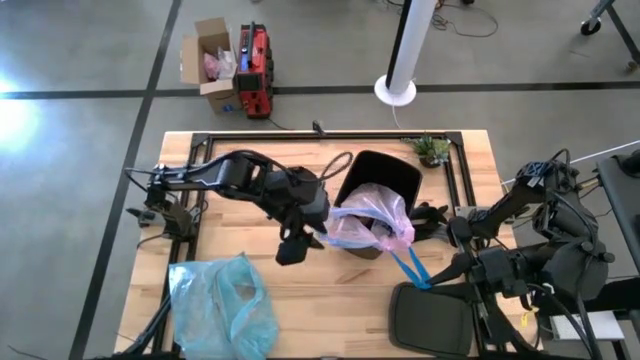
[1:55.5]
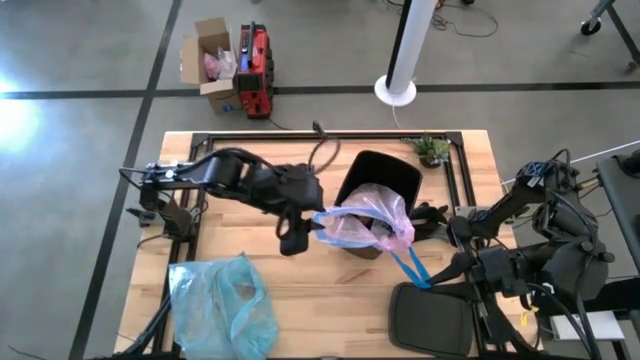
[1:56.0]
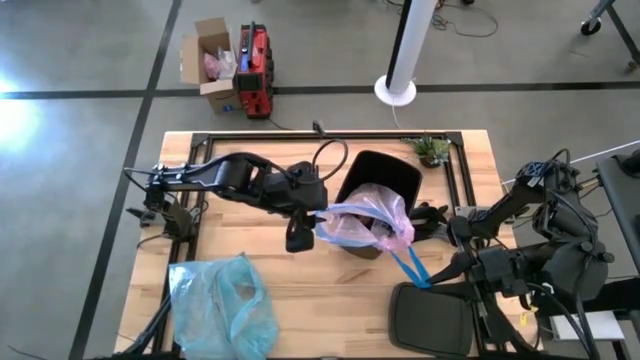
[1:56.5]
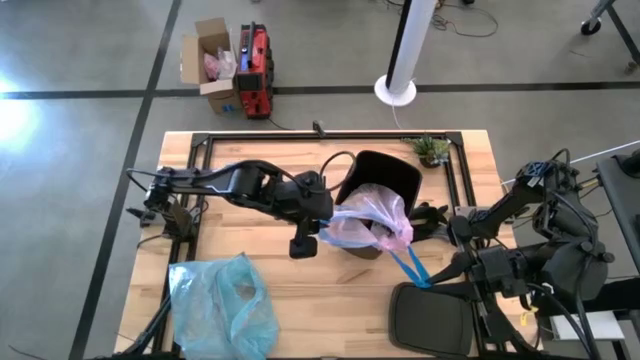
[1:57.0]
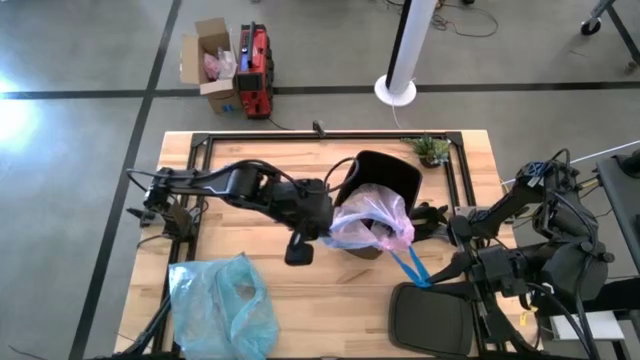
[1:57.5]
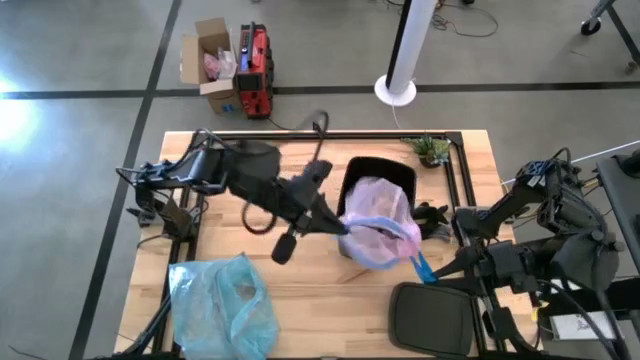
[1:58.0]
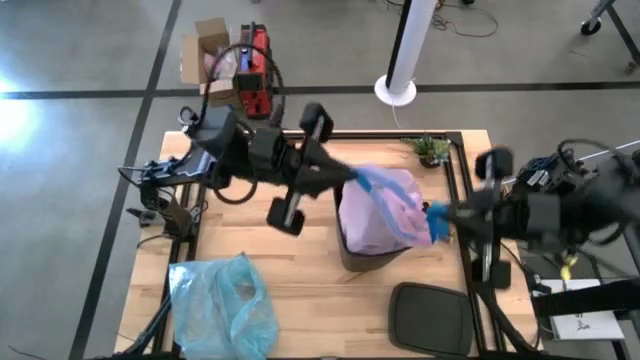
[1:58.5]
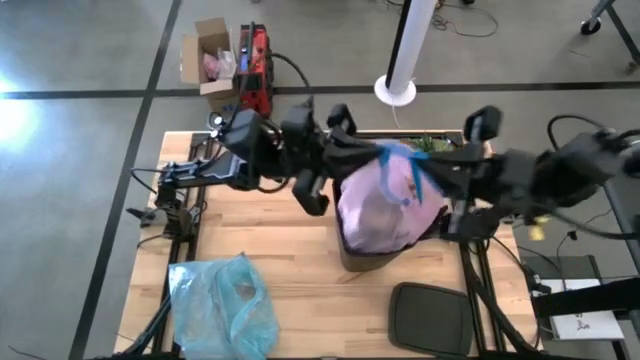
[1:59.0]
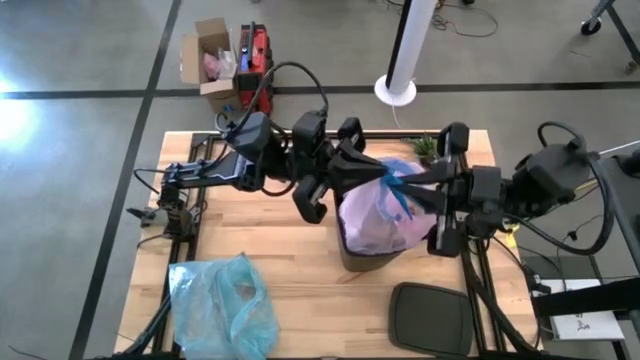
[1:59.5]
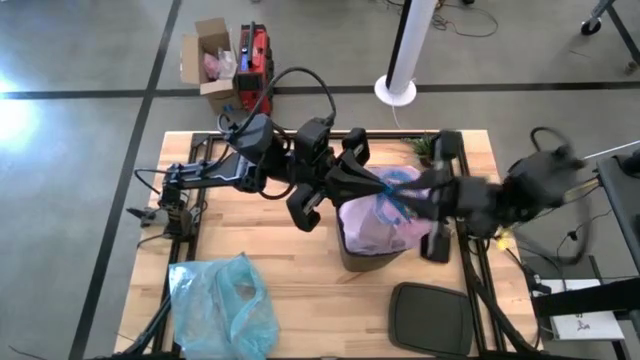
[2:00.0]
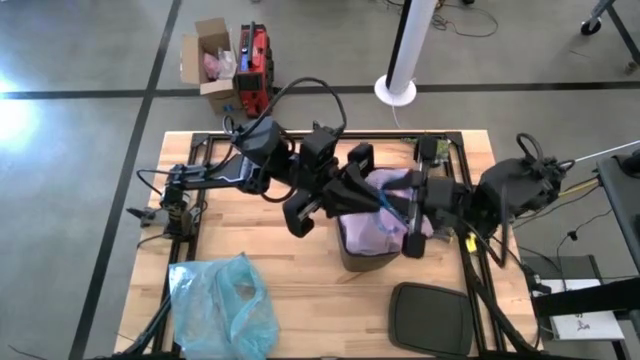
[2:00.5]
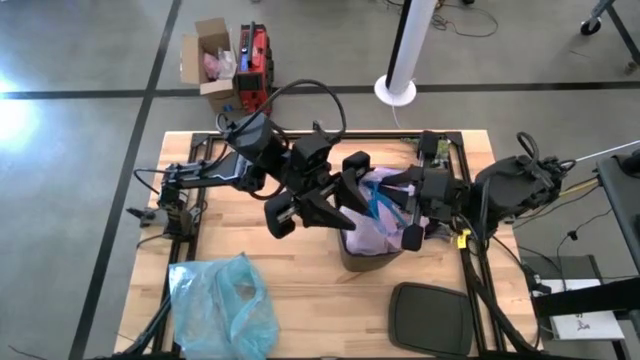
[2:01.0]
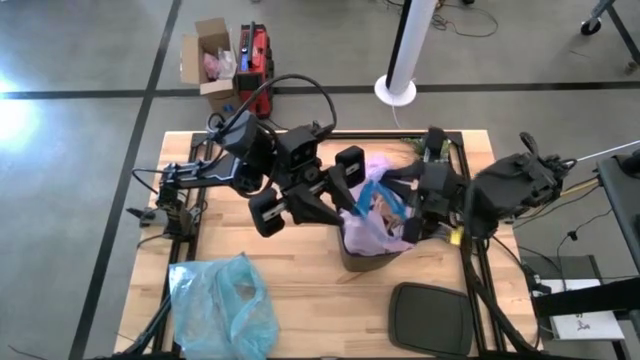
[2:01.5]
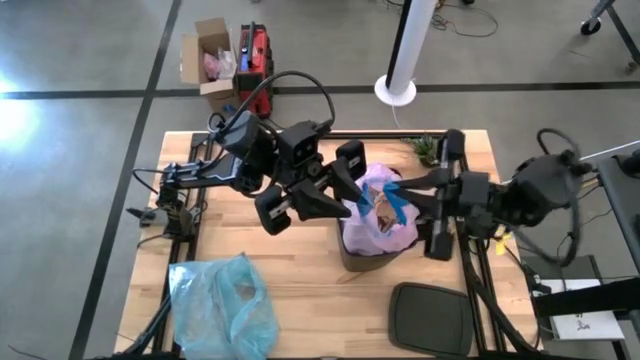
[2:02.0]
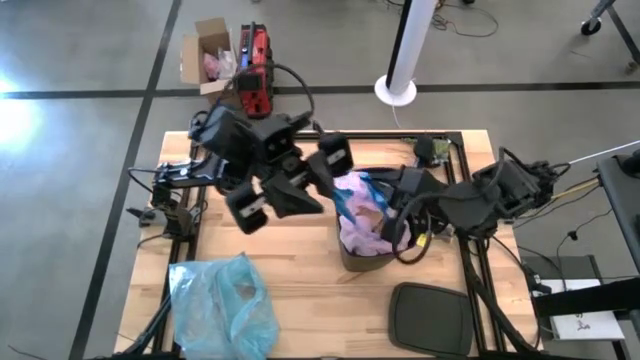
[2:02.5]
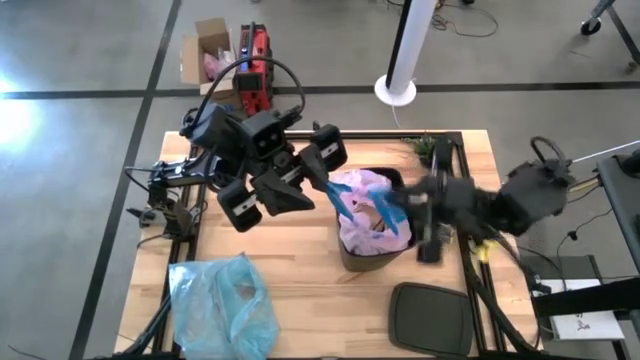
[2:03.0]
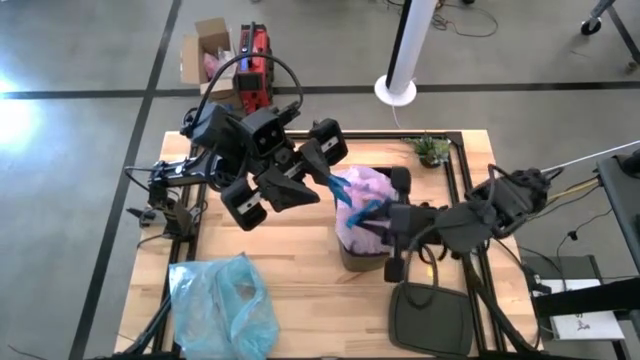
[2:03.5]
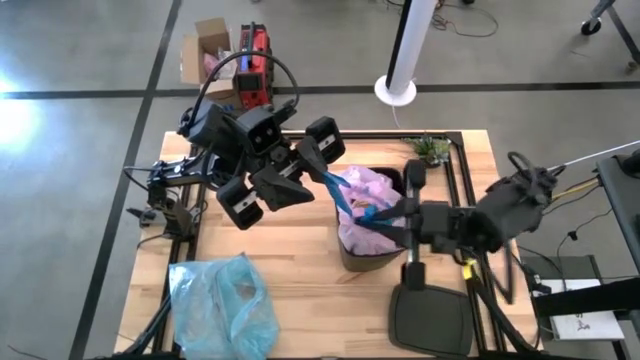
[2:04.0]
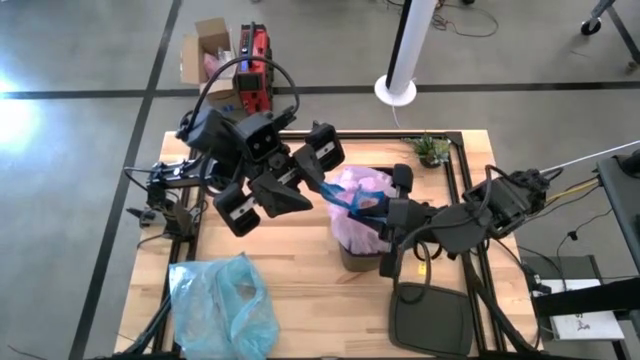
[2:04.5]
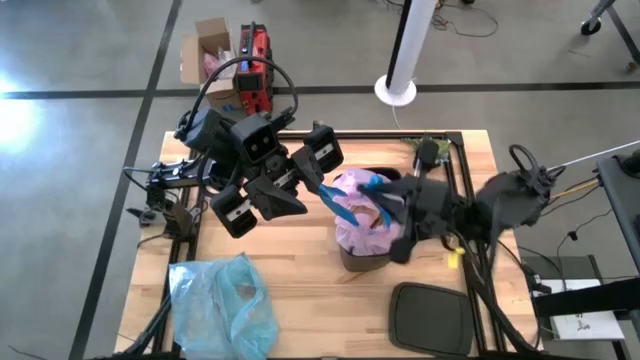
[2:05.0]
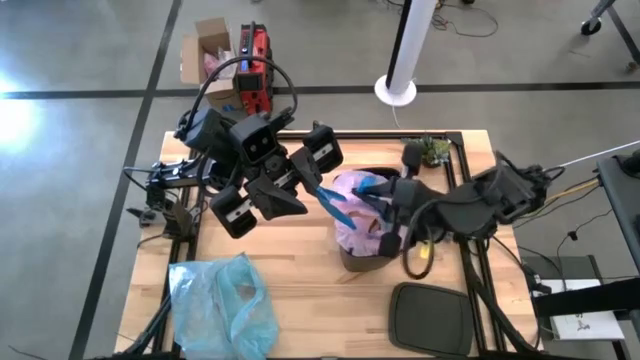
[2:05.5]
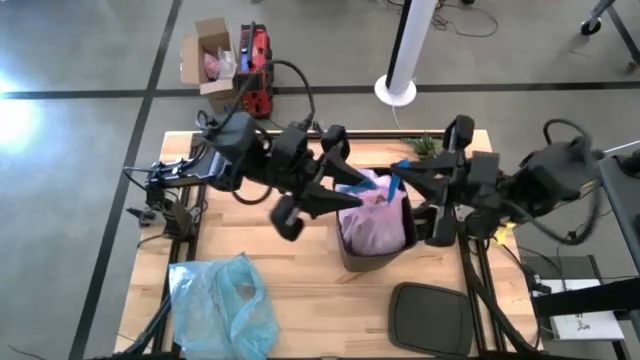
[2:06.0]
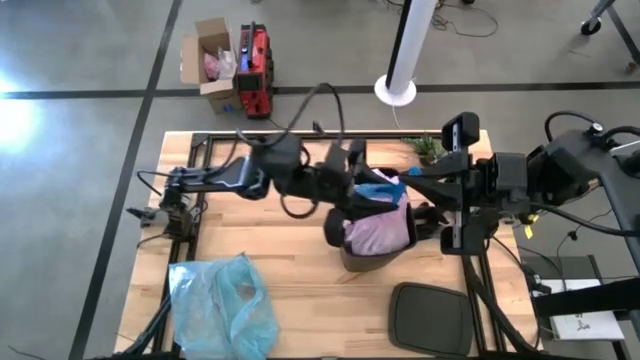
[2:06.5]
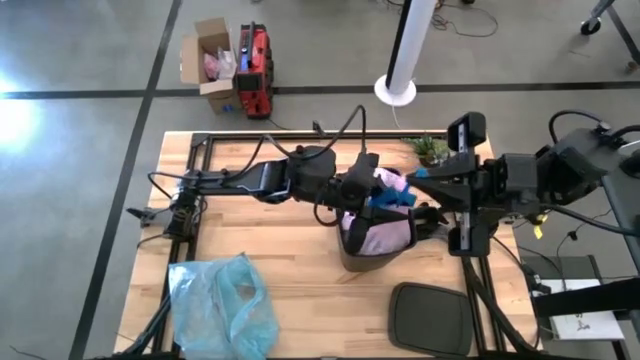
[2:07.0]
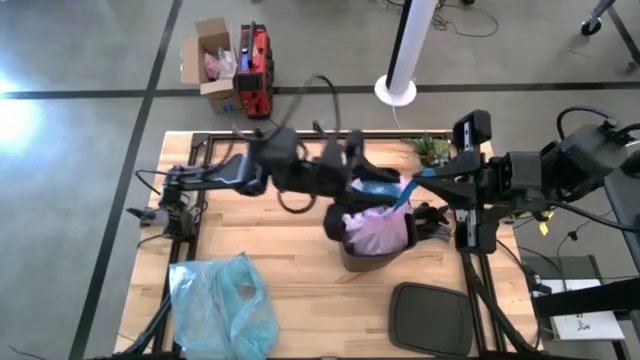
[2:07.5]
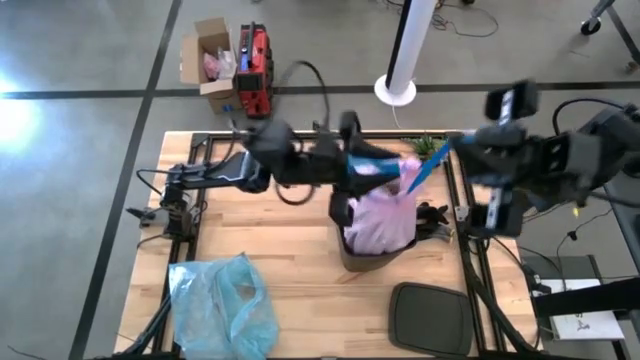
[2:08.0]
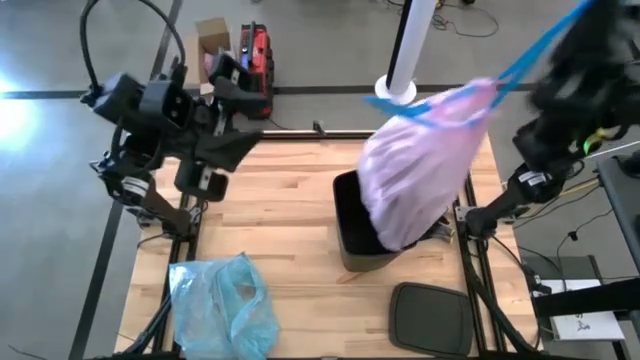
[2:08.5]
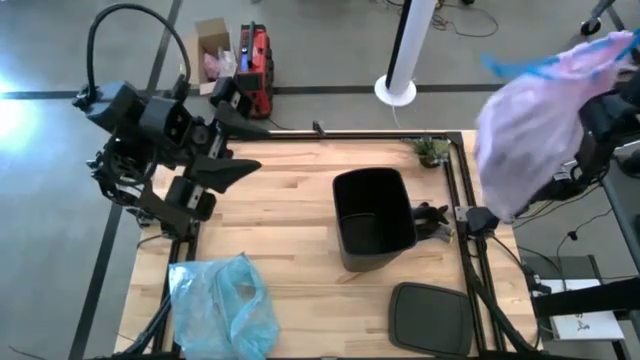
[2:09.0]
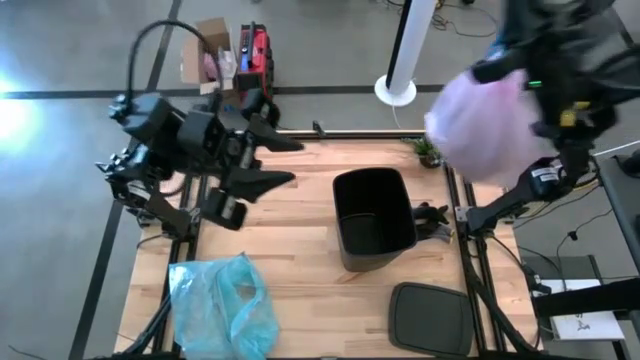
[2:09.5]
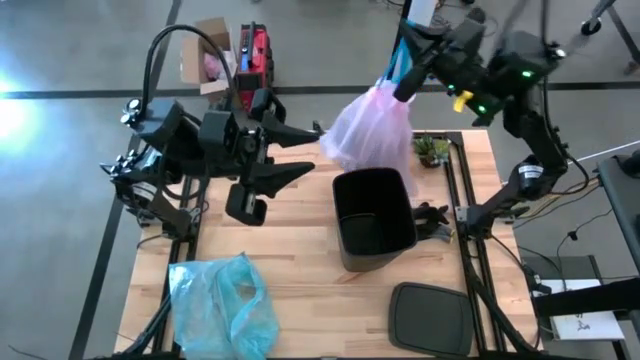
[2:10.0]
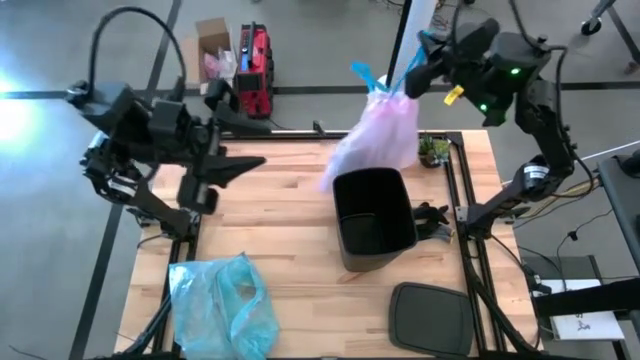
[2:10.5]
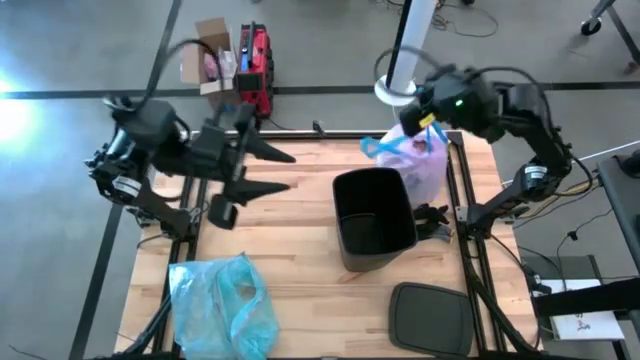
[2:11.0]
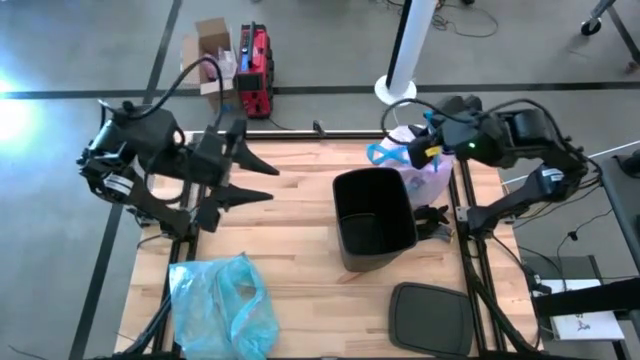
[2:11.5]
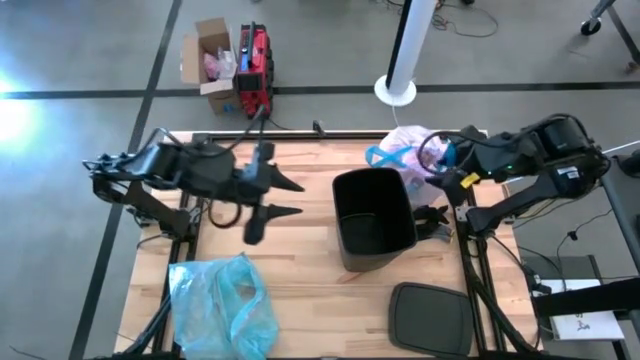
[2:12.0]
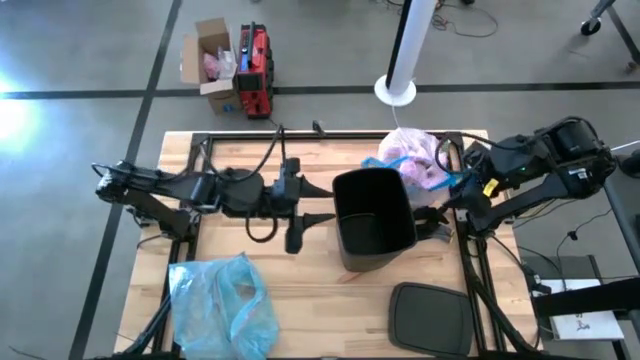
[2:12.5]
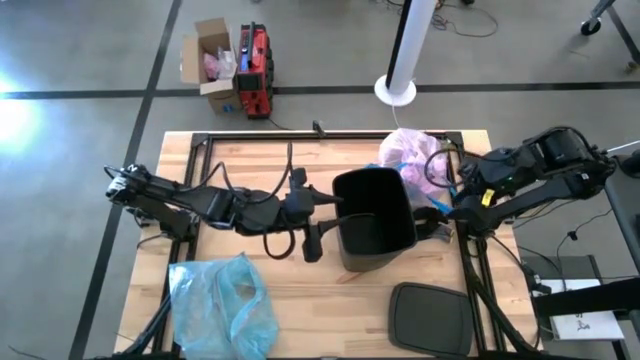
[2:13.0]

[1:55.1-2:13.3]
Task: place trash/remove bag and relplace
Remove the trash bag from the trash bin

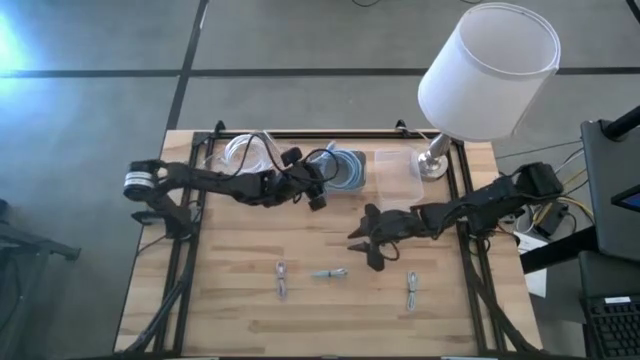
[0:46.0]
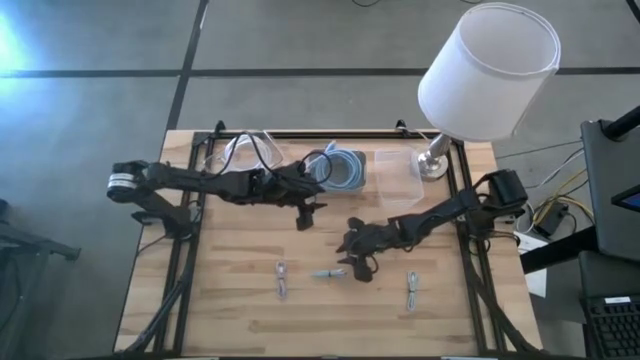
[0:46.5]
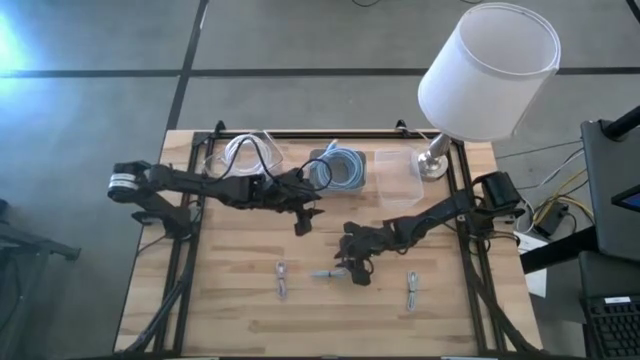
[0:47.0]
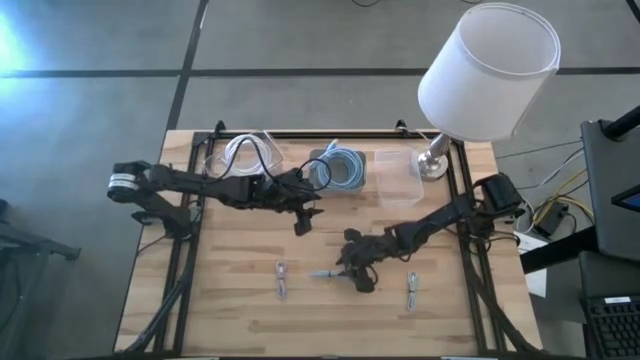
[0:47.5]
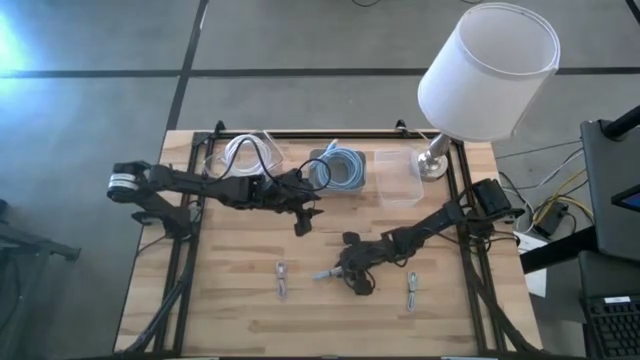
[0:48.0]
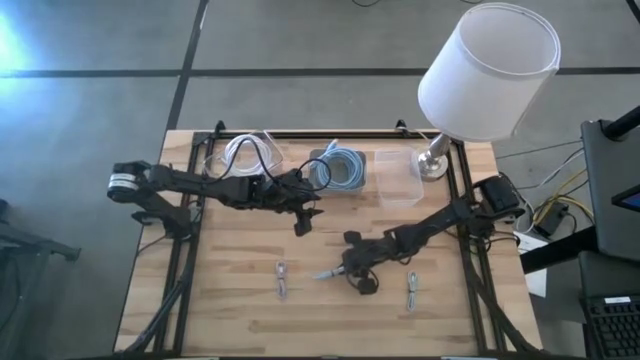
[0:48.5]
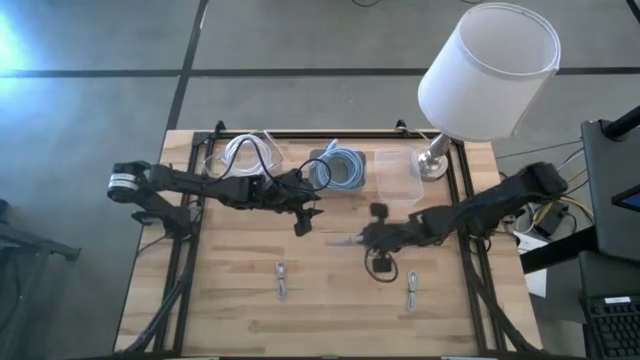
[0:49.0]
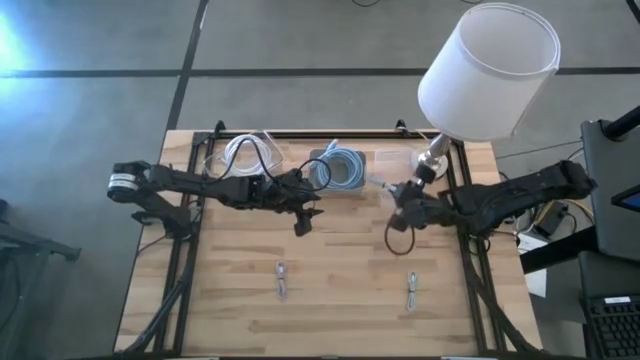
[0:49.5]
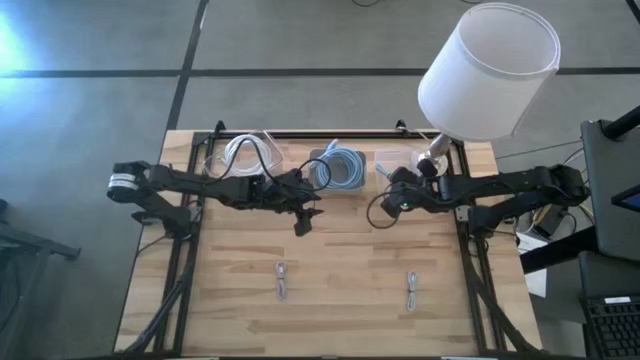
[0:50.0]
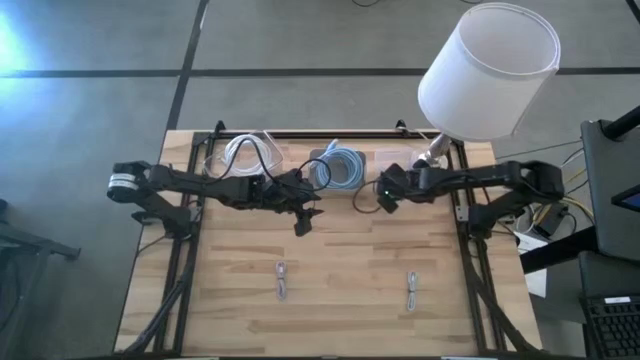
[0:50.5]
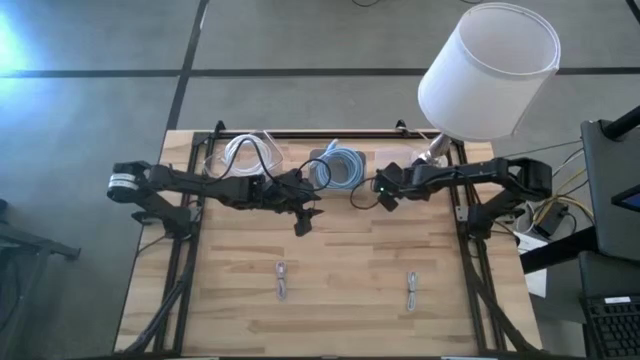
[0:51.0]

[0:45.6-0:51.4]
Task: Pick & Place USB Port
Put the small blue charger cable into the right transparent bin
